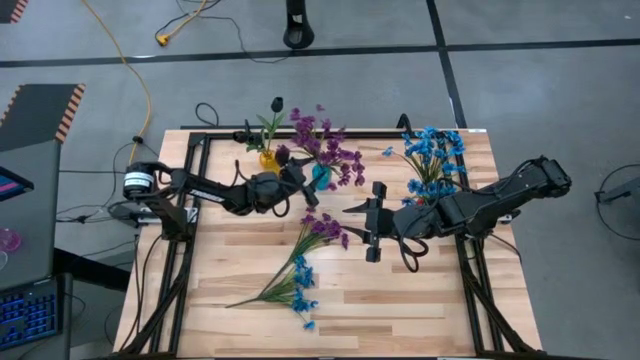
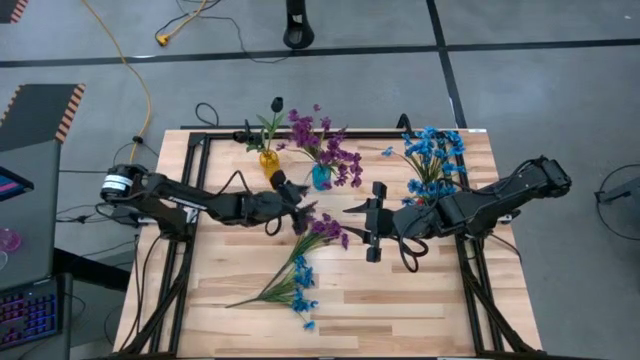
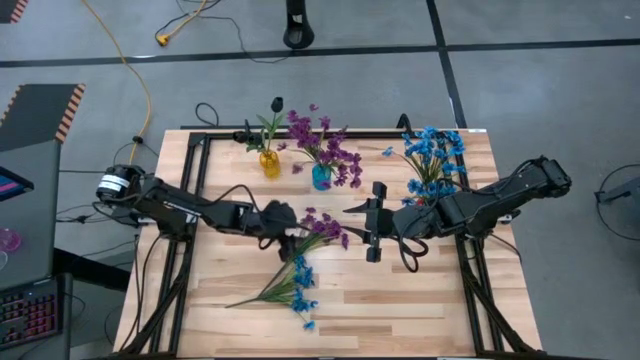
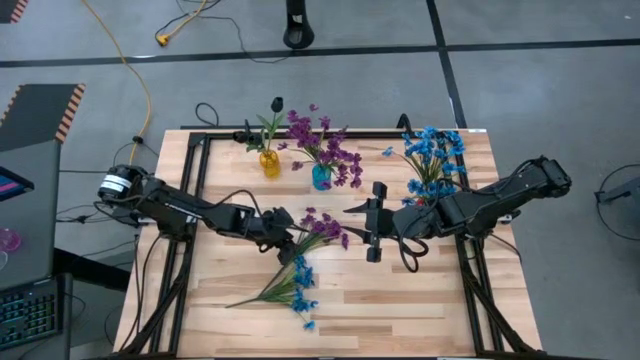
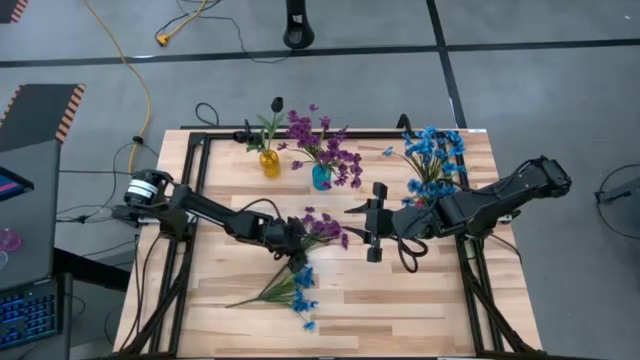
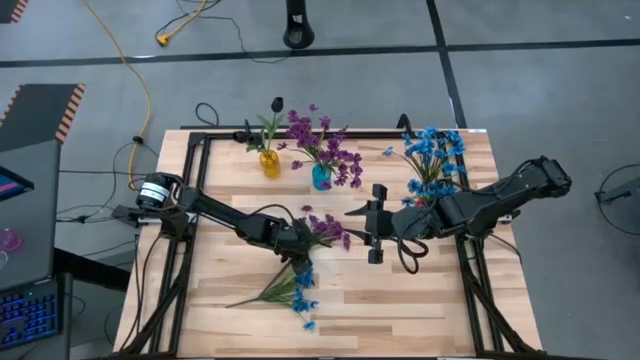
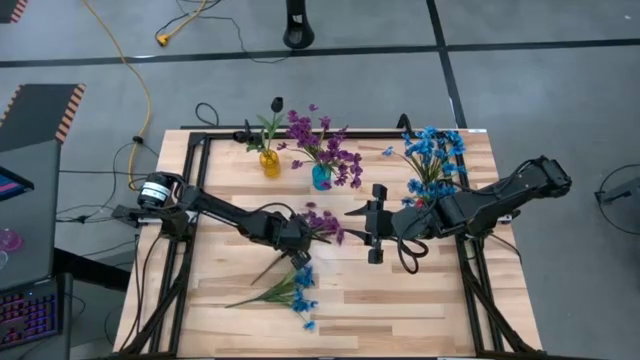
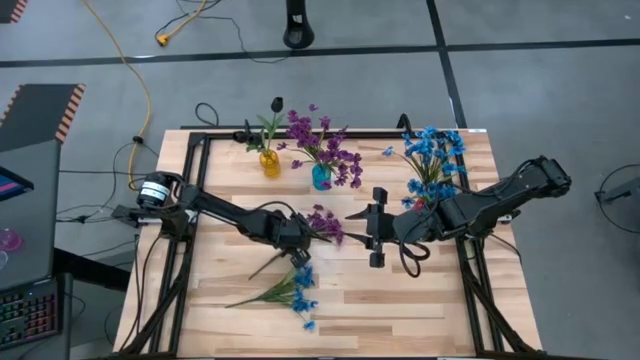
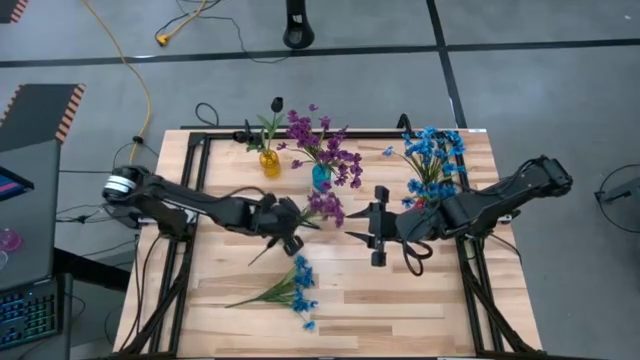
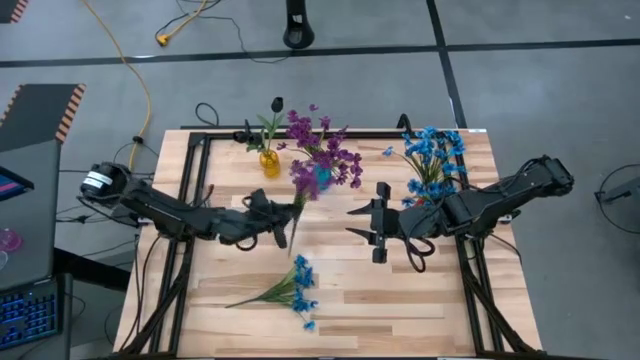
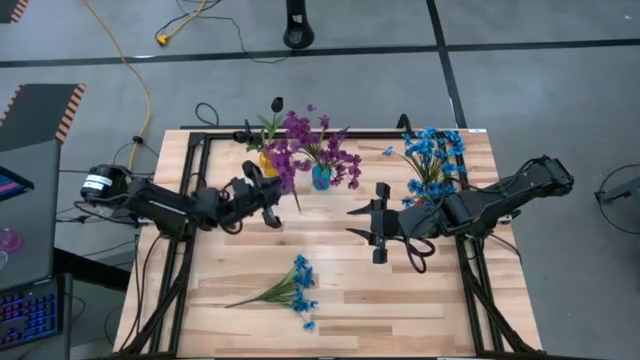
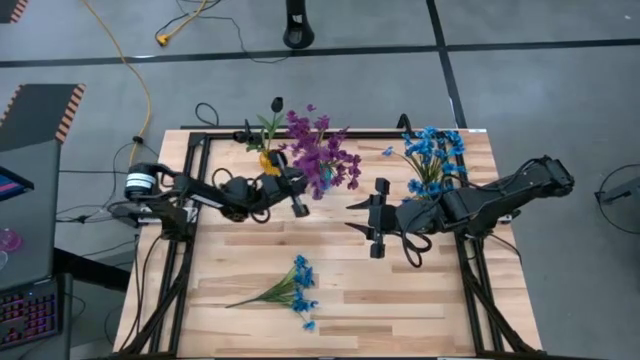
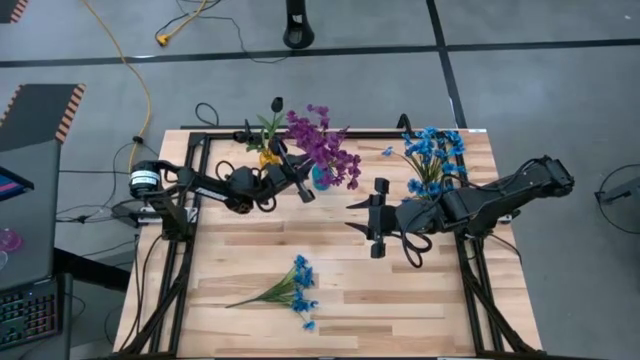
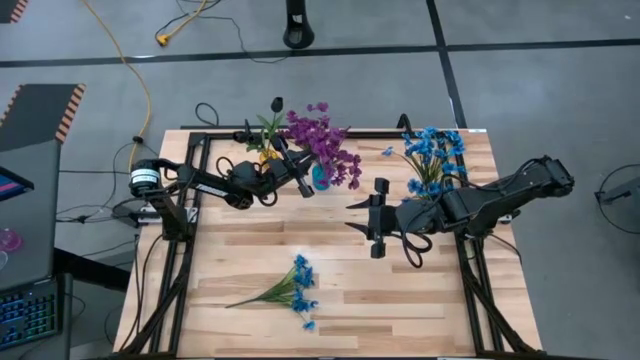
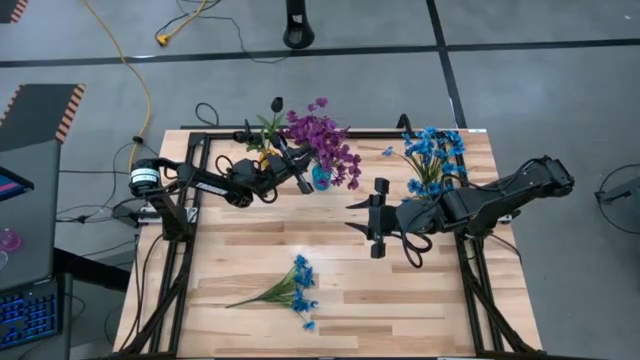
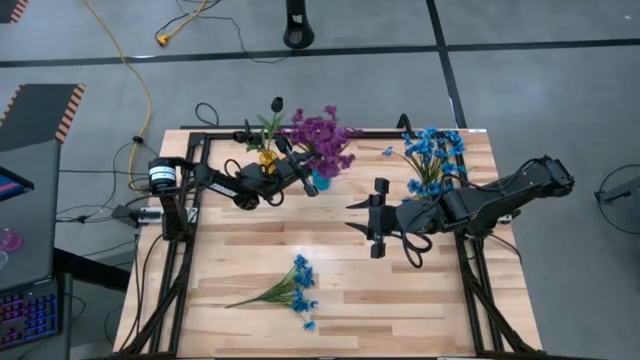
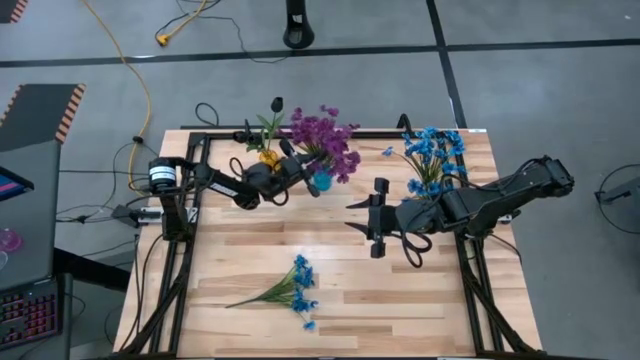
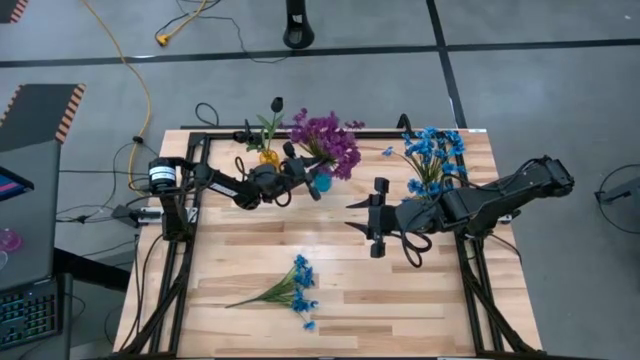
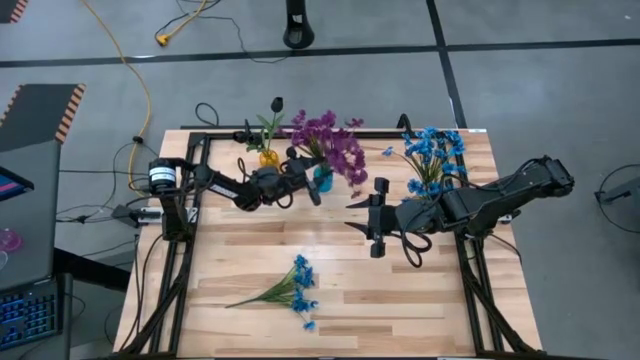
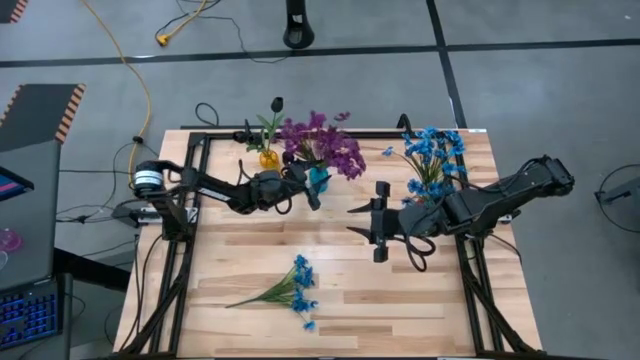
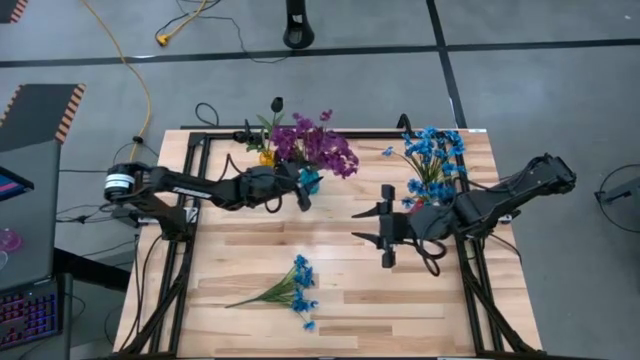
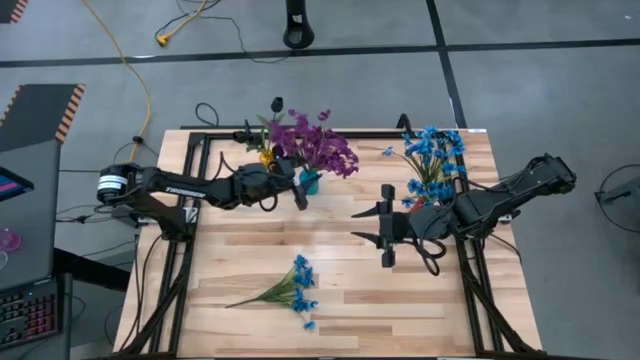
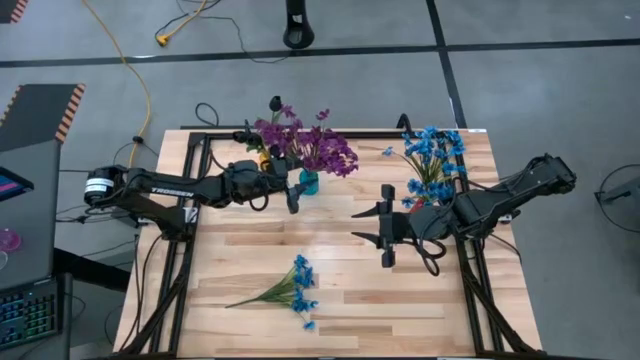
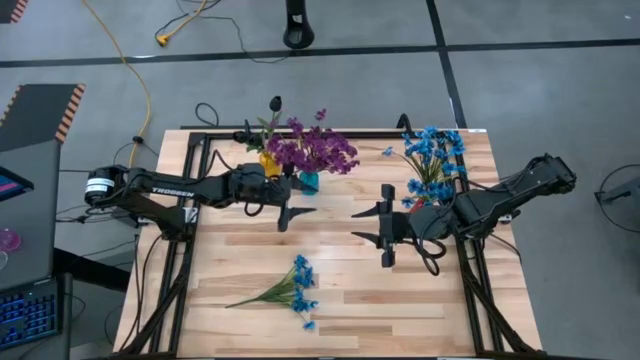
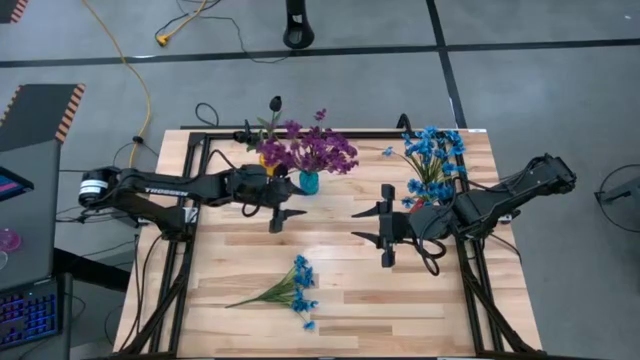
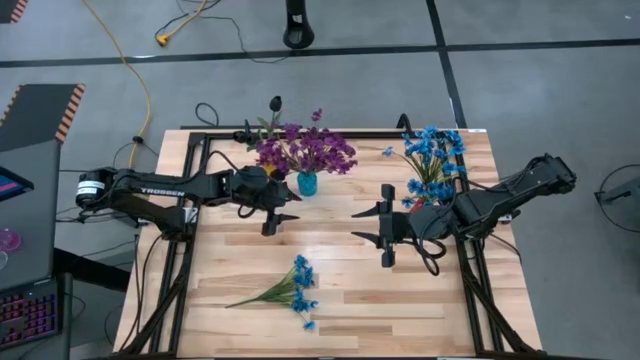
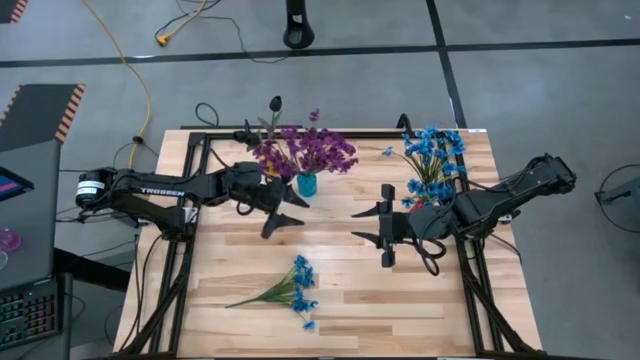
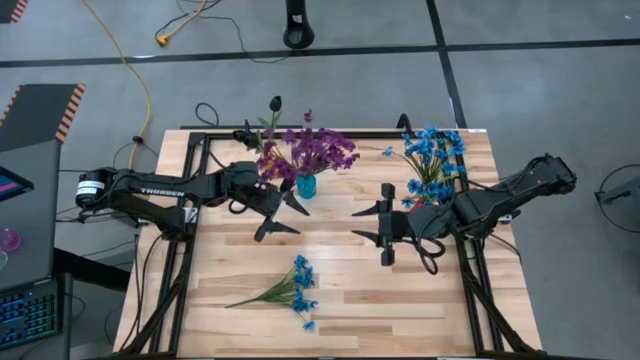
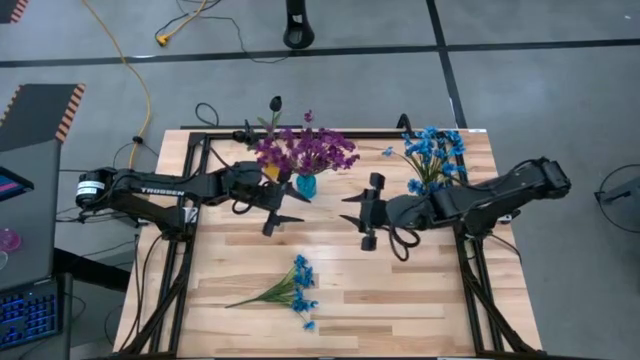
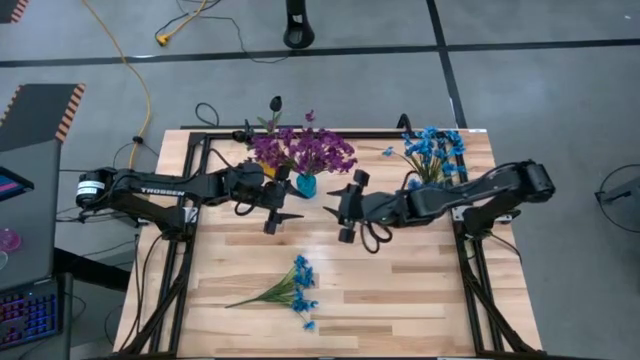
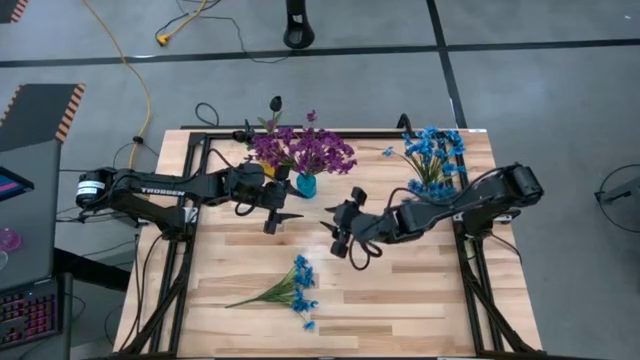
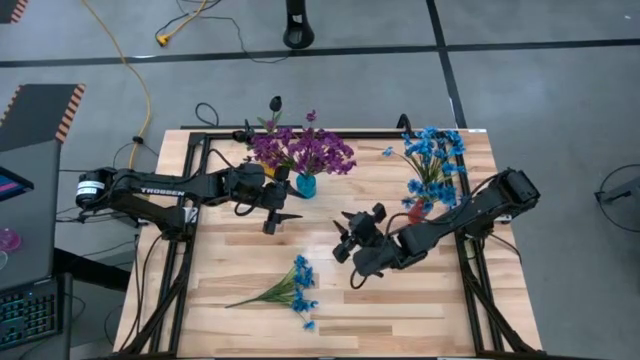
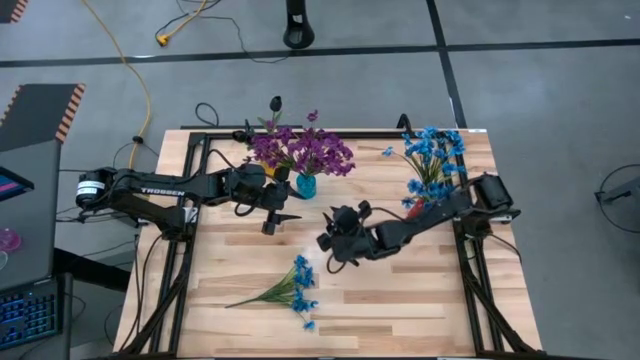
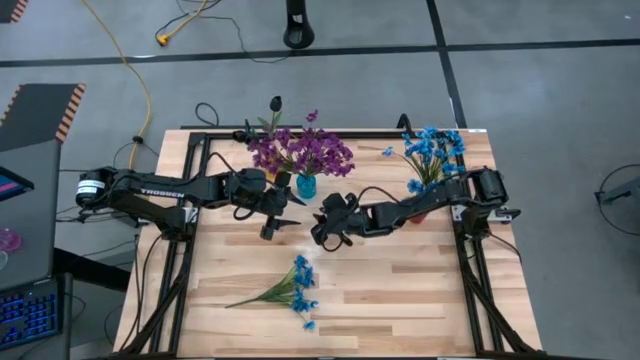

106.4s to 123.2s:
Task: Sort flowers into vase by color
Put the violet flower into the blue vase
